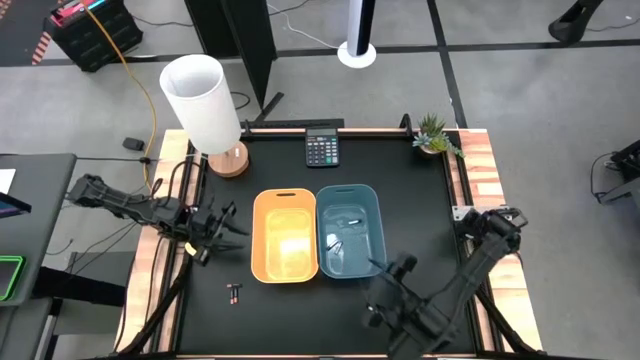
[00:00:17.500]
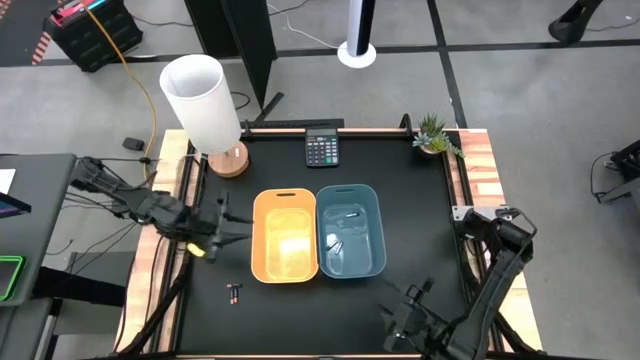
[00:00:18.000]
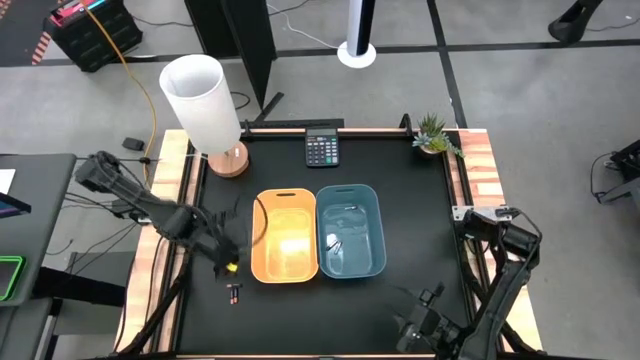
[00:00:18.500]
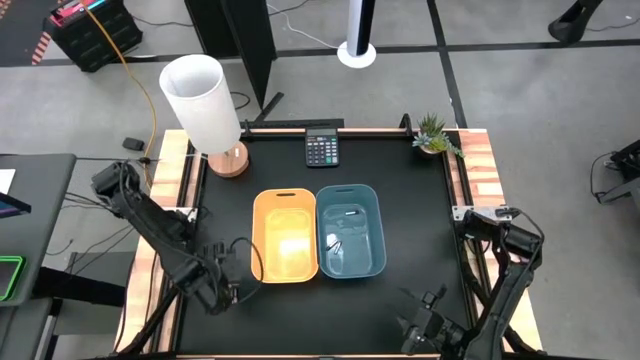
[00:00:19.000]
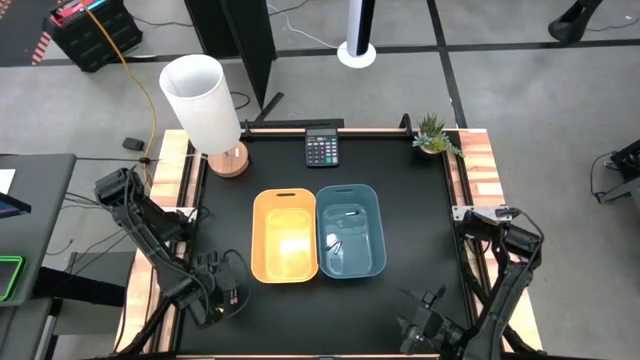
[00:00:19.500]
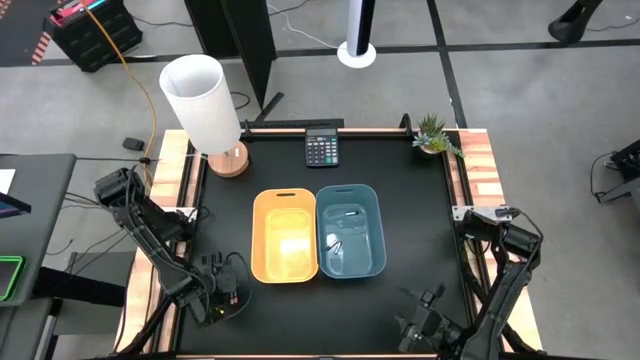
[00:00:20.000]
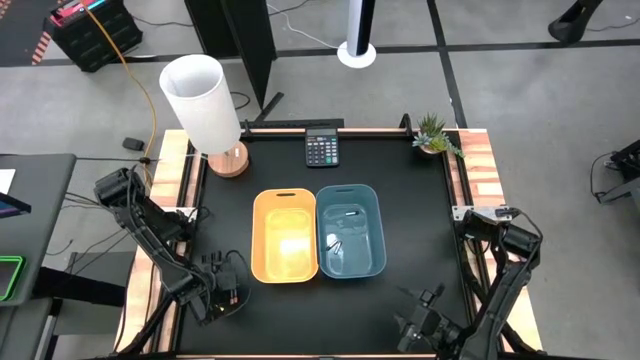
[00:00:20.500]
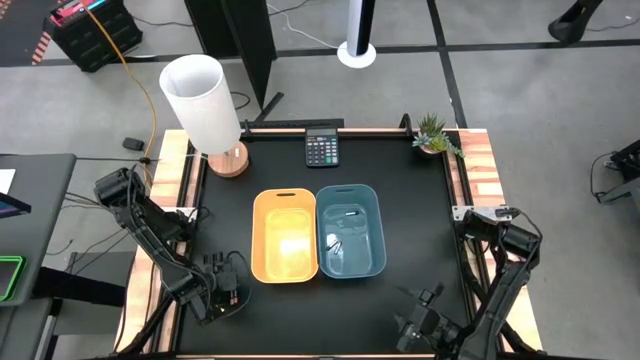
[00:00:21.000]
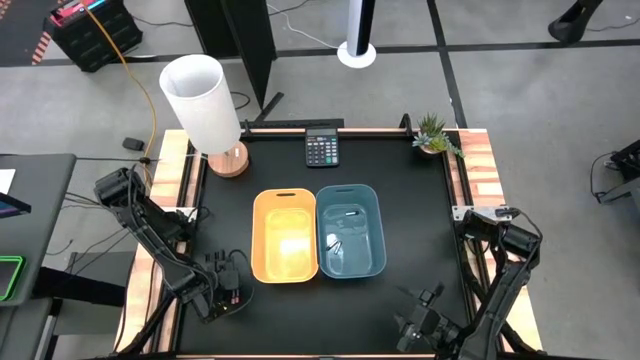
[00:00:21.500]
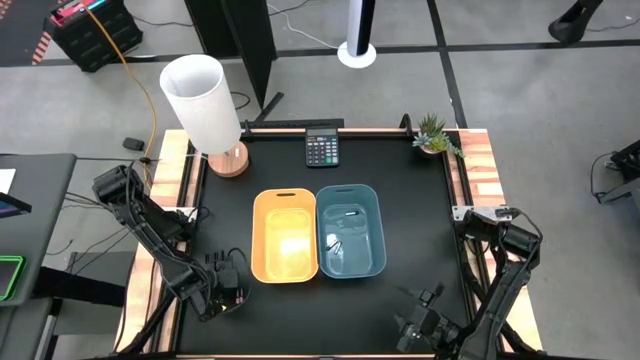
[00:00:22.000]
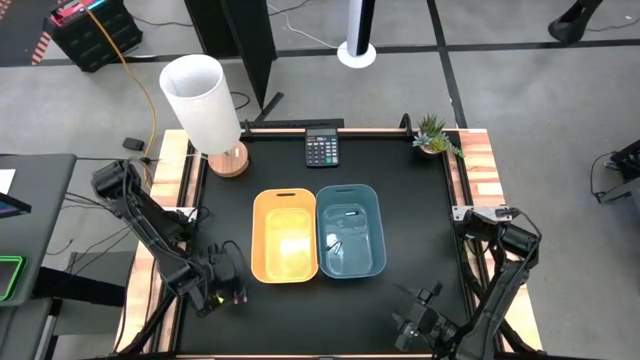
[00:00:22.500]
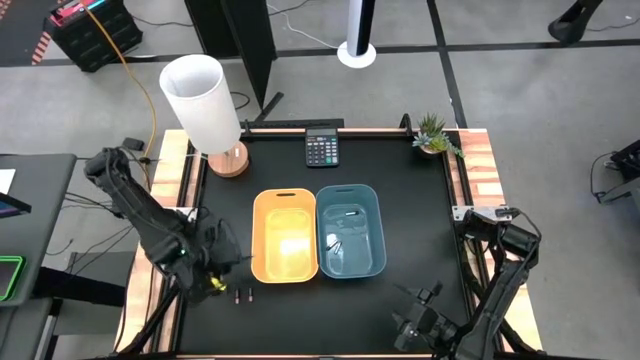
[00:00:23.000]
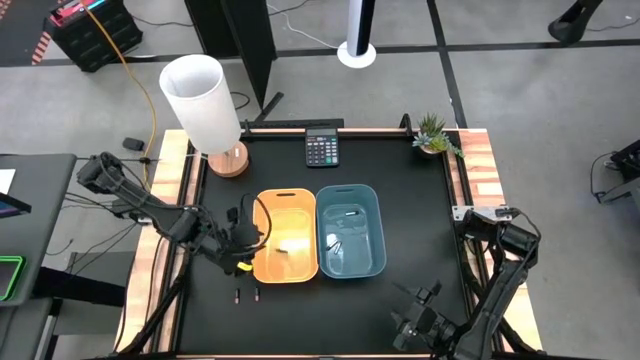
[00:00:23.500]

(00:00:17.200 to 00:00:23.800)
Task: Sort batteries
Put the top black battery into the yellow bin

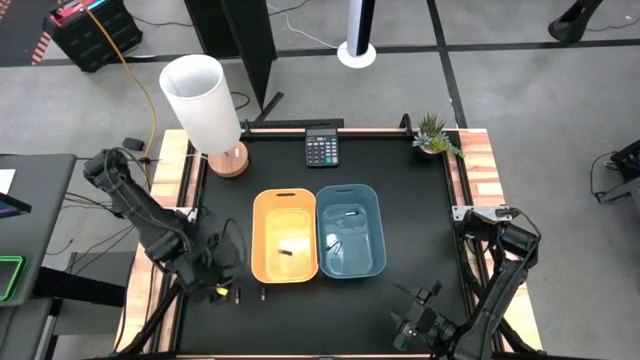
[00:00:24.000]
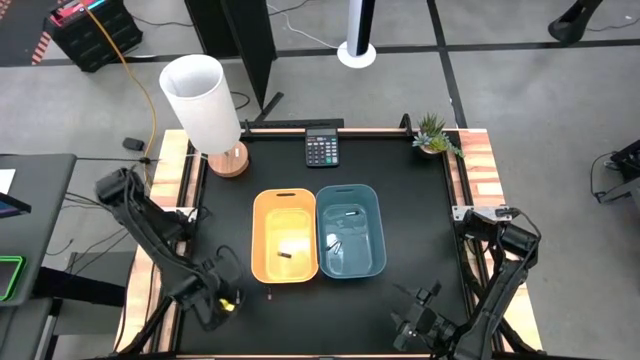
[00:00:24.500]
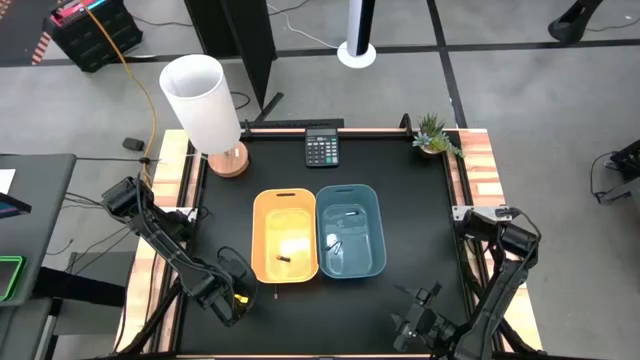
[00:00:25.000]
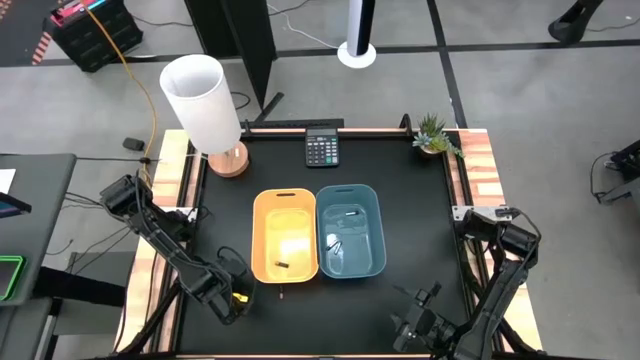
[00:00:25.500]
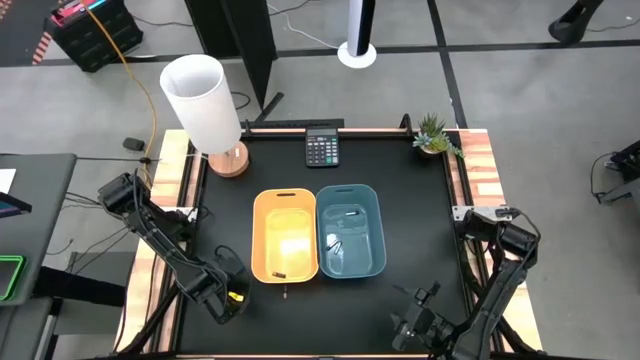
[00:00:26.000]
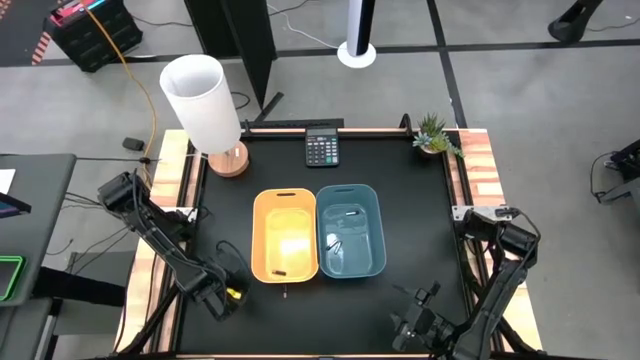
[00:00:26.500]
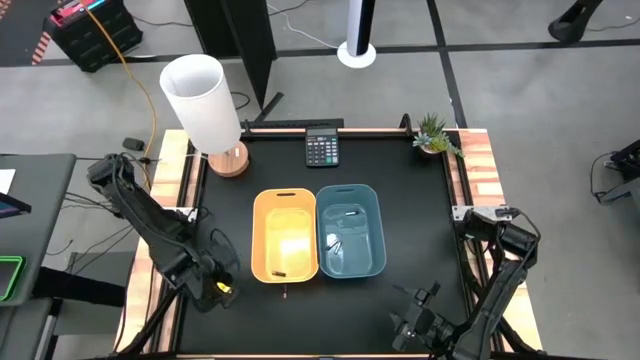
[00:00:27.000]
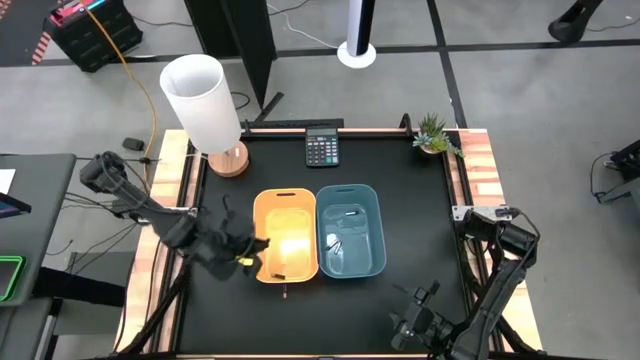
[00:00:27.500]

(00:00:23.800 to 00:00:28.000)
Put the left black battery into the yellow bin

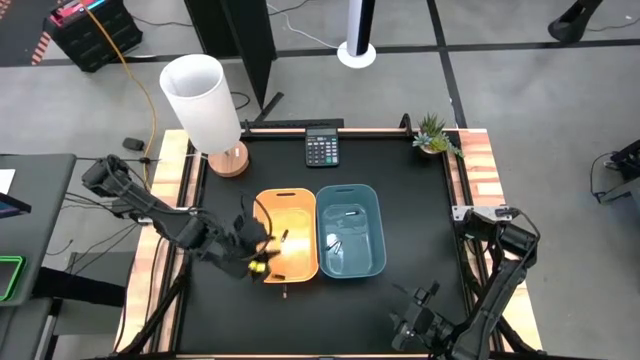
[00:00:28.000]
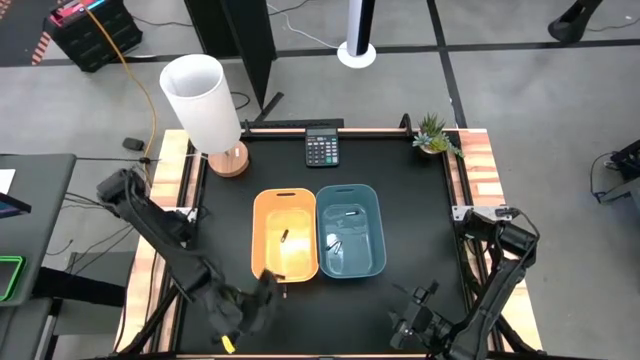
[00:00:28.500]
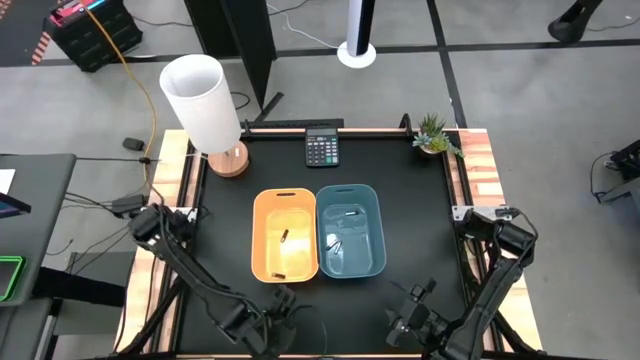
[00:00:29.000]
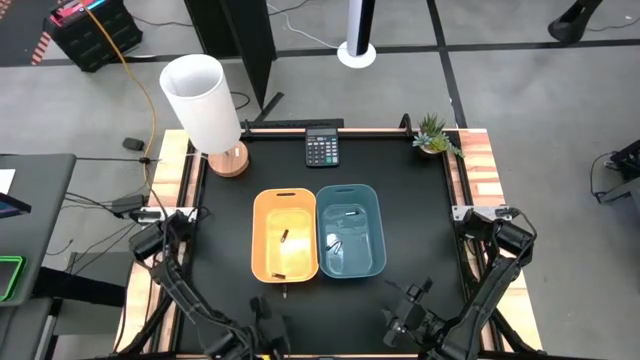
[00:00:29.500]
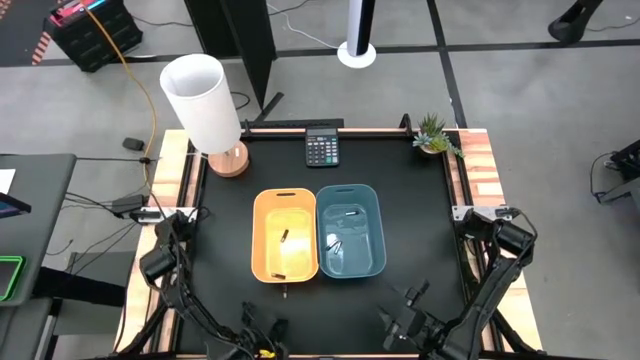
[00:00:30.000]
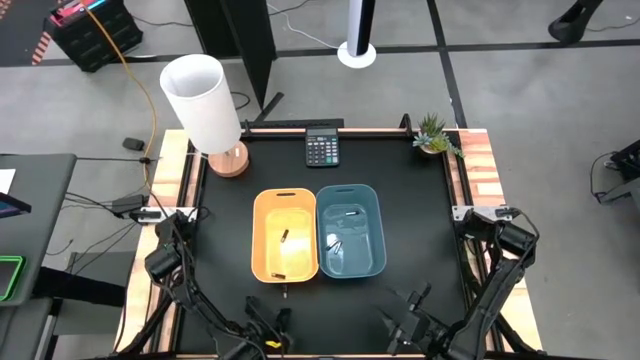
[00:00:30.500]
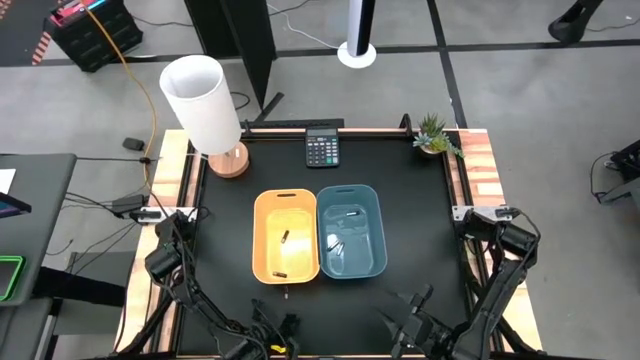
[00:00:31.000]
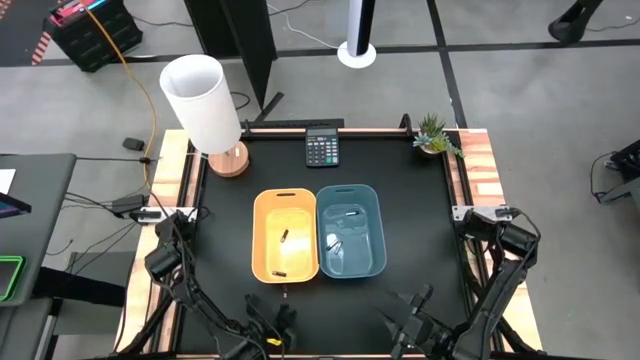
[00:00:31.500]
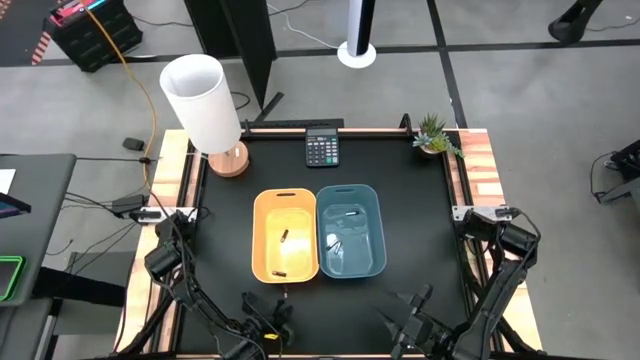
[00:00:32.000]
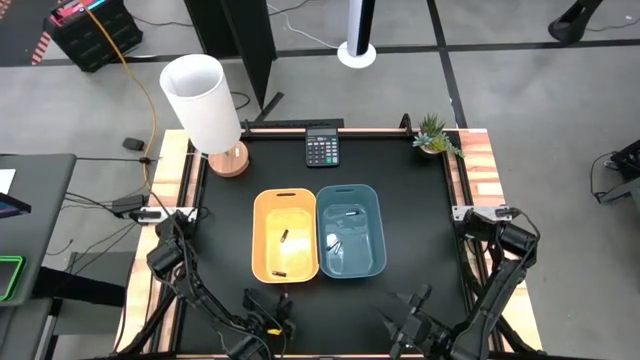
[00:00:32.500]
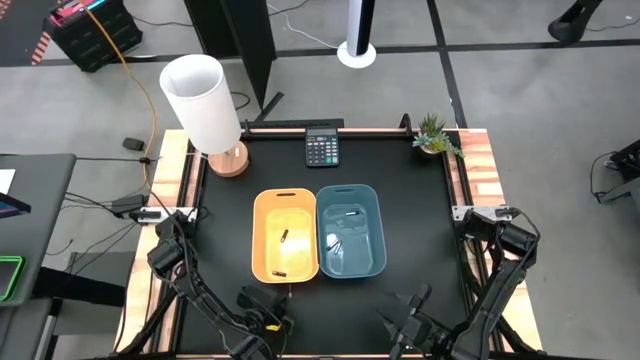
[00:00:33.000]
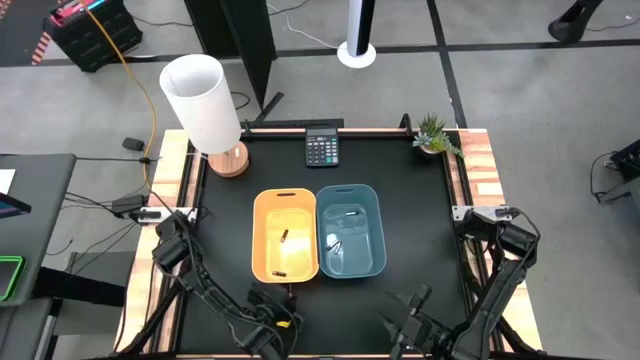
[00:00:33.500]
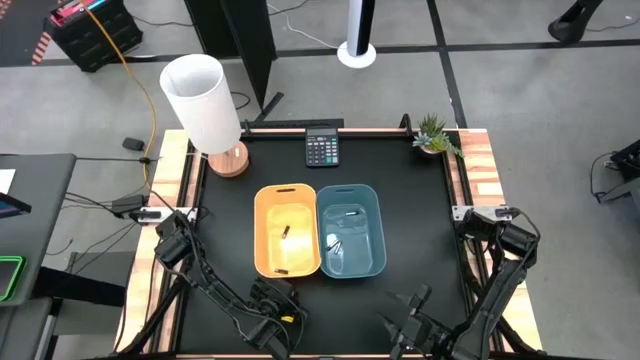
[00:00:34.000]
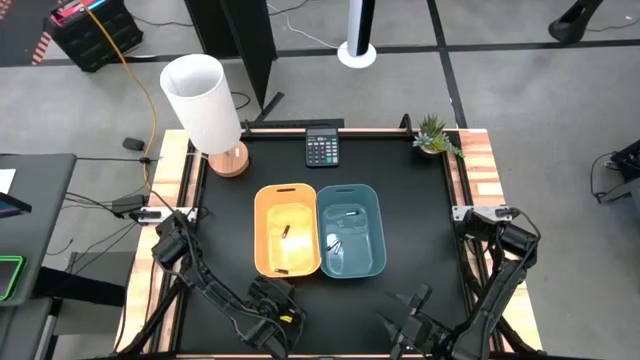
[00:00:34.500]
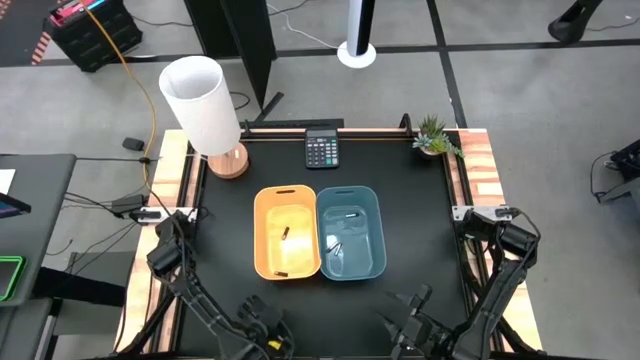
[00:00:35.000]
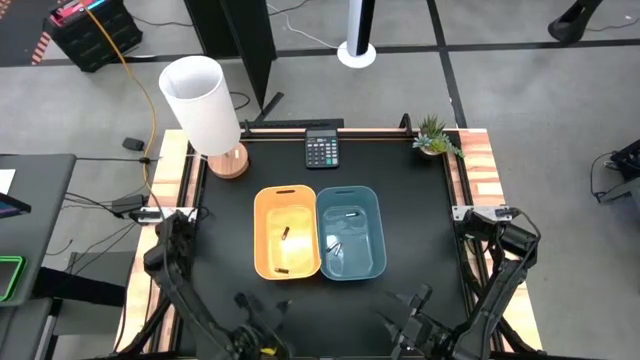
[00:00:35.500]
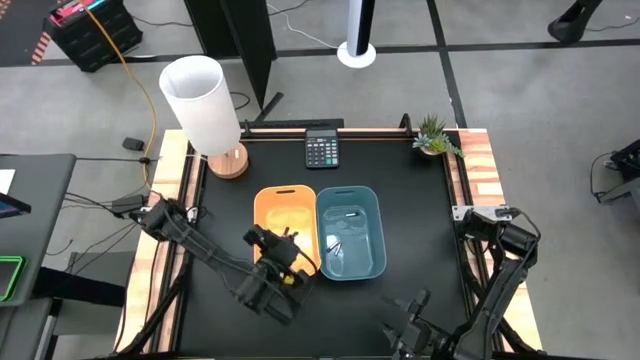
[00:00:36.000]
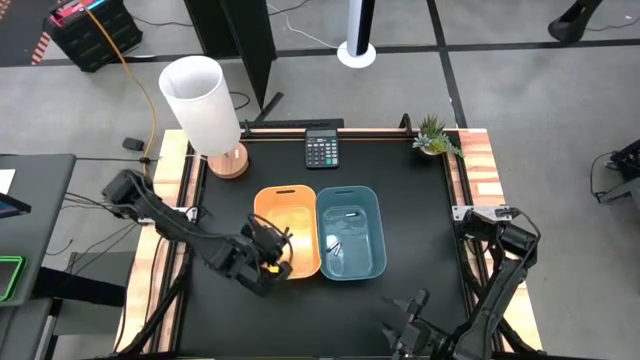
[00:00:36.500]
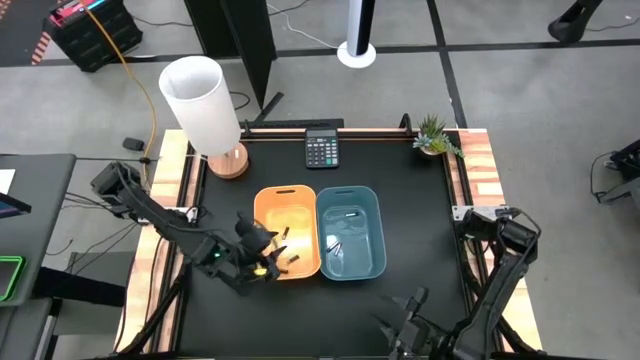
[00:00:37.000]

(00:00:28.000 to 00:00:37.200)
Put the black battery into the yellow bin
